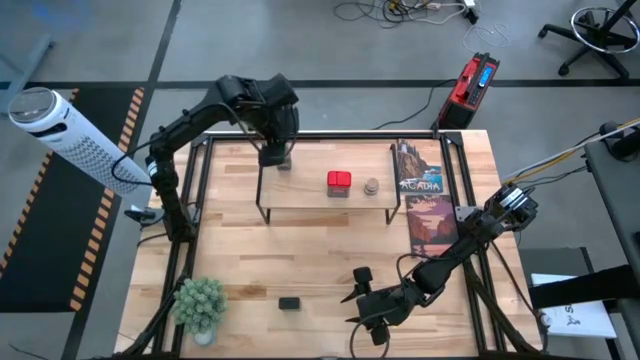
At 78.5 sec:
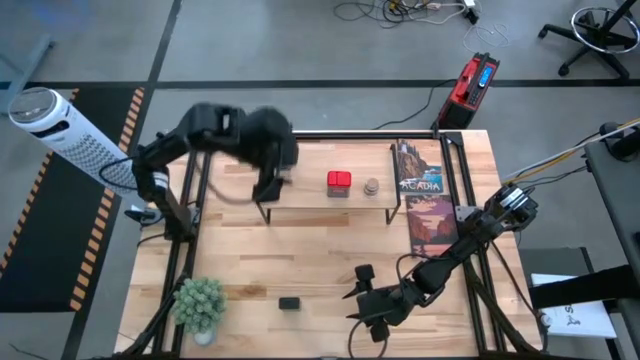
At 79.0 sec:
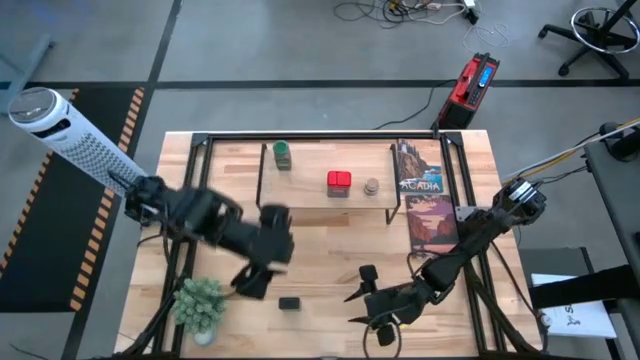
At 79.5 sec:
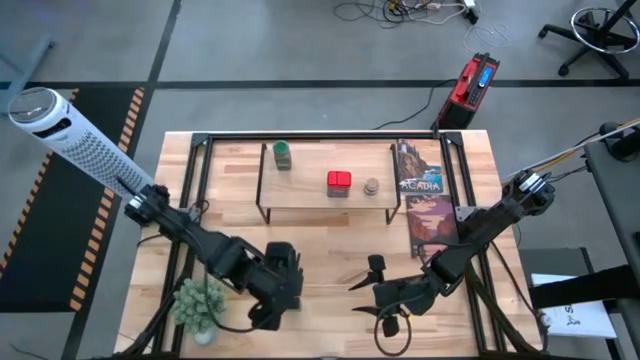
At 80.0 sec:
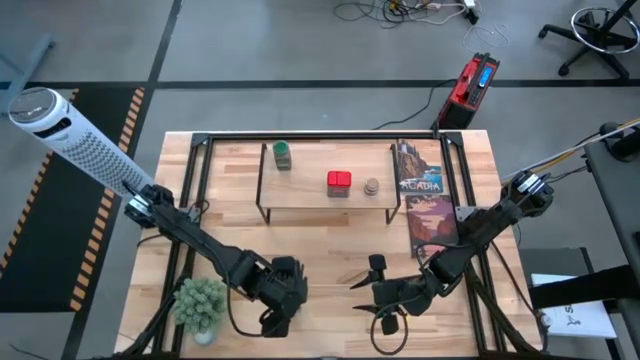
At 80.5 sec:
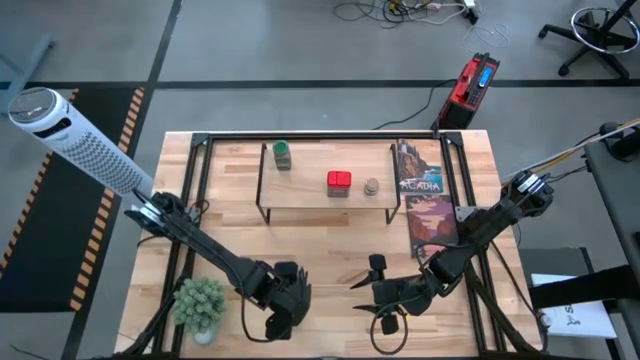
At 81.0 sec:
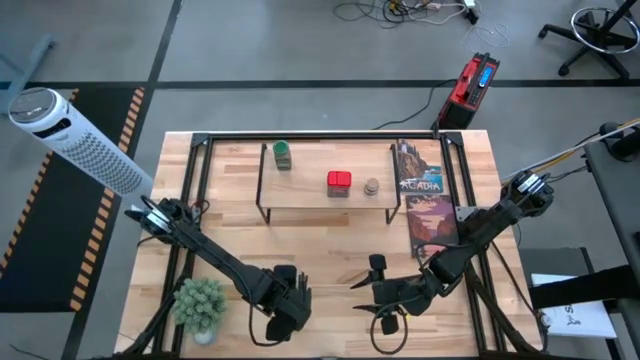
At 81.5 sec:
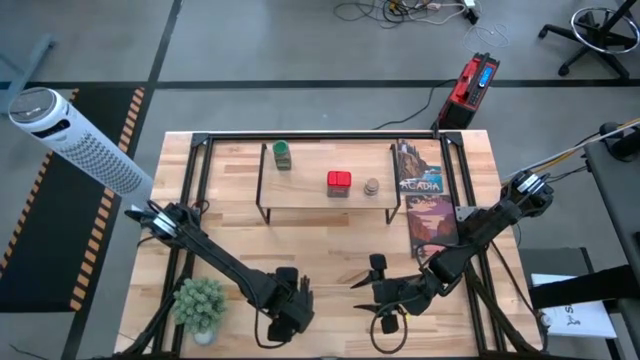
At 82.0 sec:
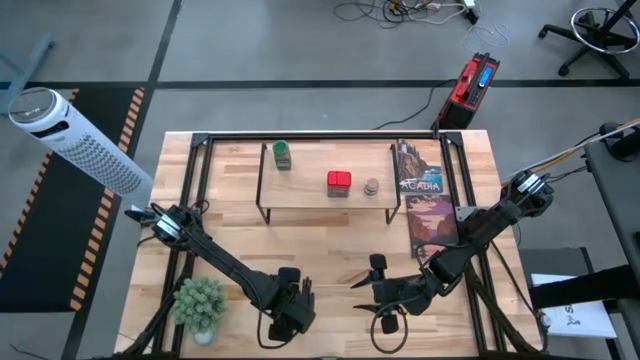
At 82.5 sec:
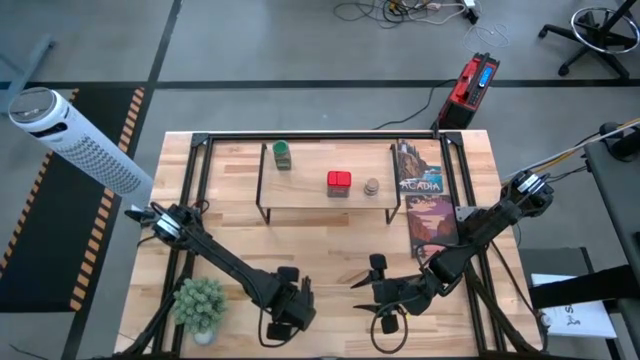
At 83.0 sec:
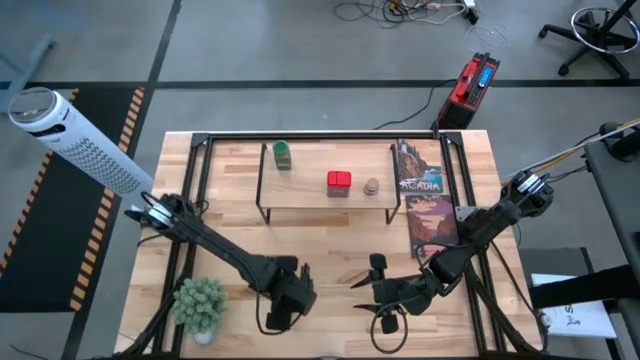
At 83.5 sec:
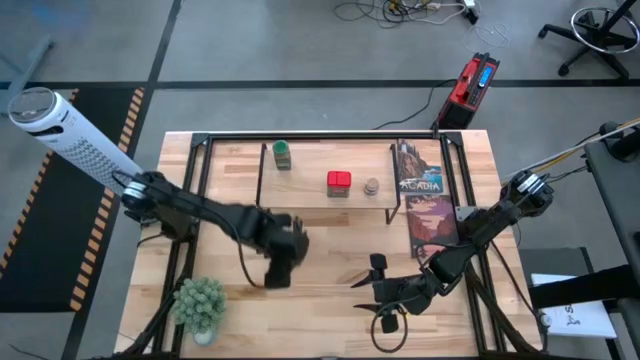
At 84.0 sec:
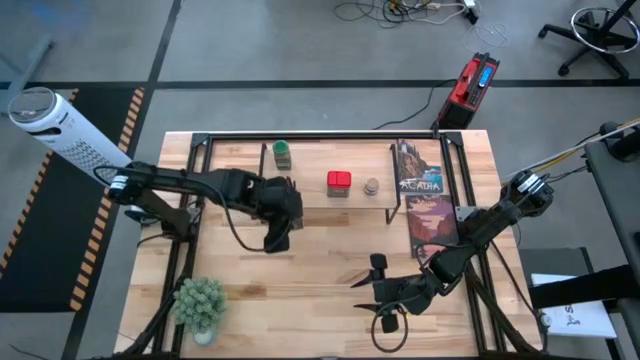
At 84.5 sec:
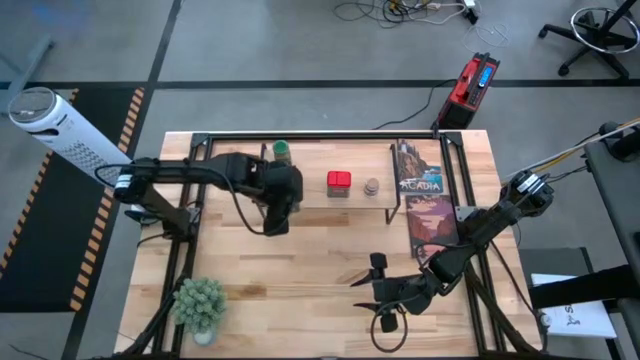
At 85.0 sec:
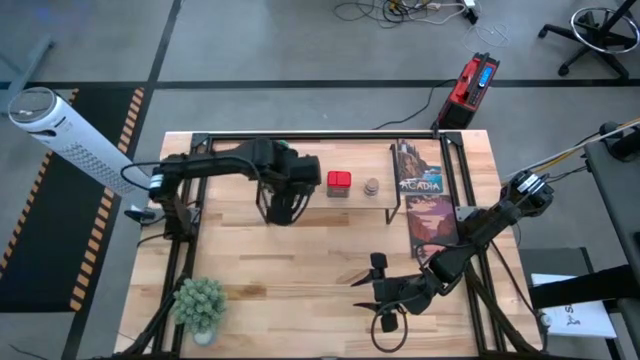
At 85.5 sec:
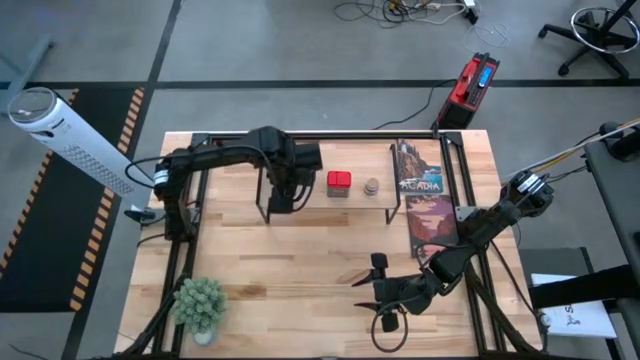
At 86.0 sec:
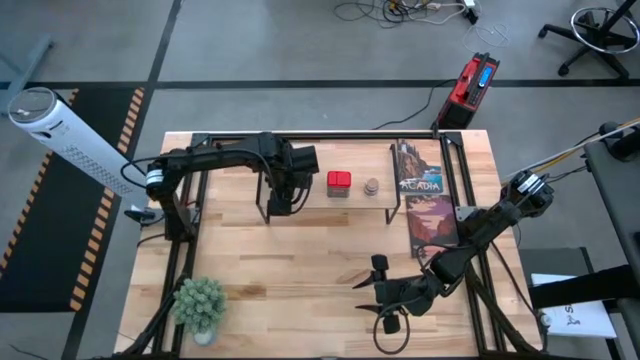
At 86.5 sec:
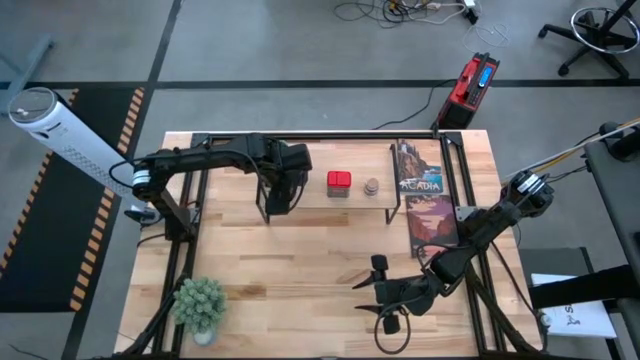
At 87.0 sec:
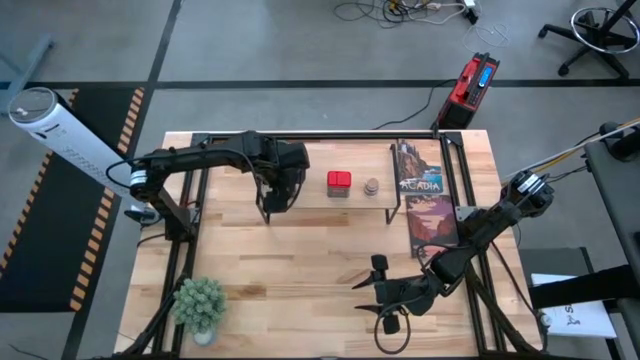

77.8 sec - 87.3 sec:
Task: Shelf spices
Put the black seasoning can on the shelf

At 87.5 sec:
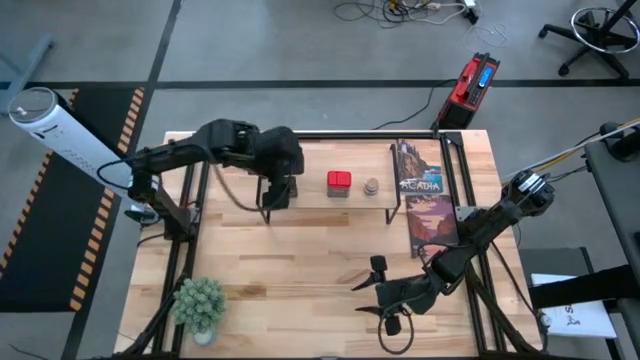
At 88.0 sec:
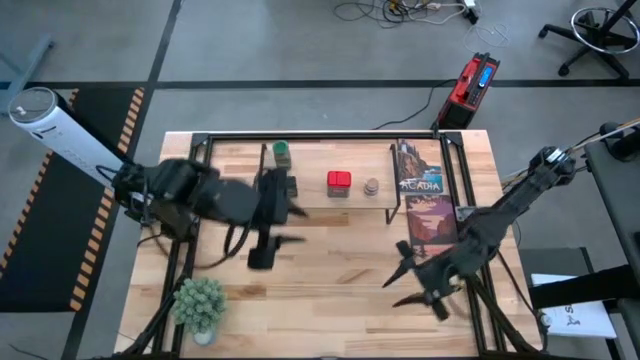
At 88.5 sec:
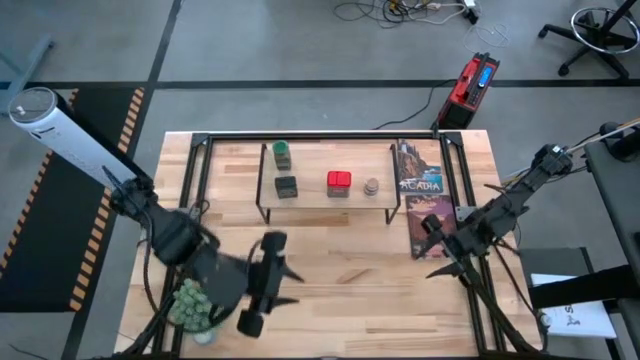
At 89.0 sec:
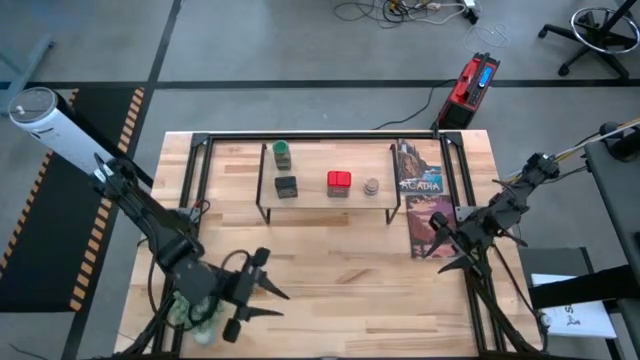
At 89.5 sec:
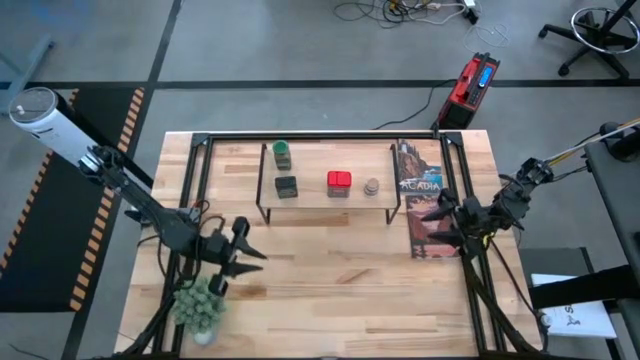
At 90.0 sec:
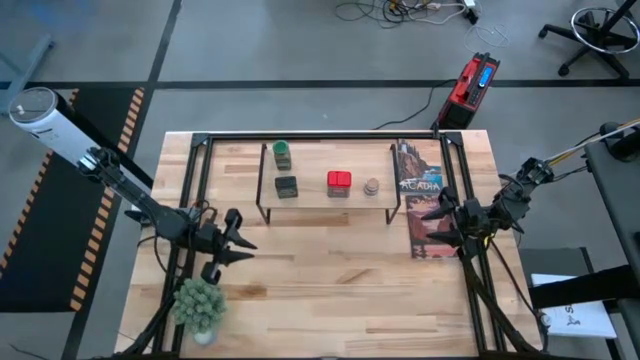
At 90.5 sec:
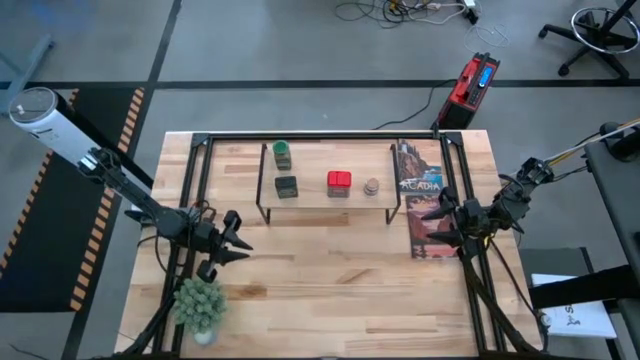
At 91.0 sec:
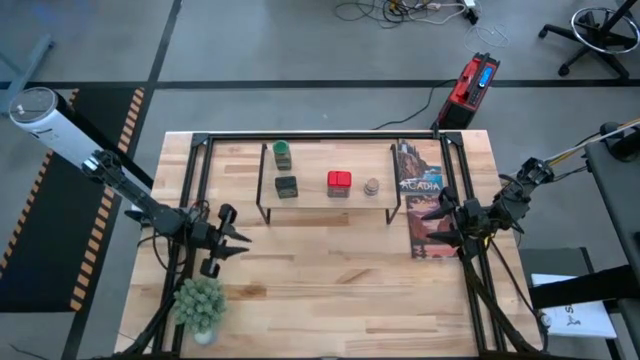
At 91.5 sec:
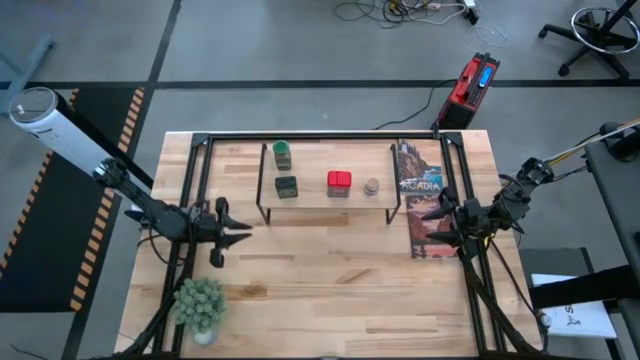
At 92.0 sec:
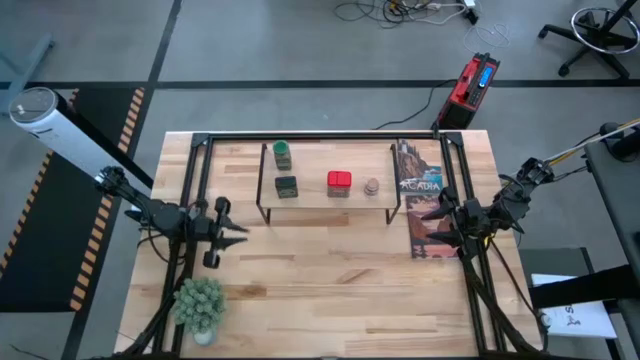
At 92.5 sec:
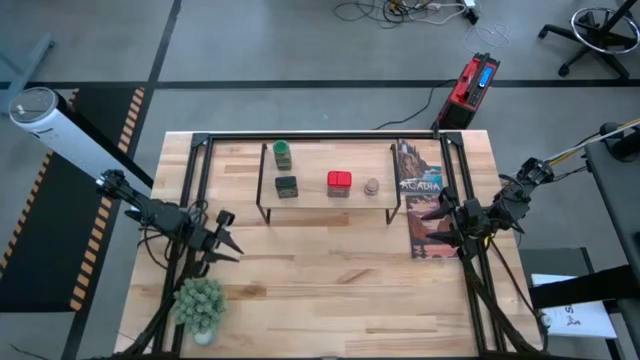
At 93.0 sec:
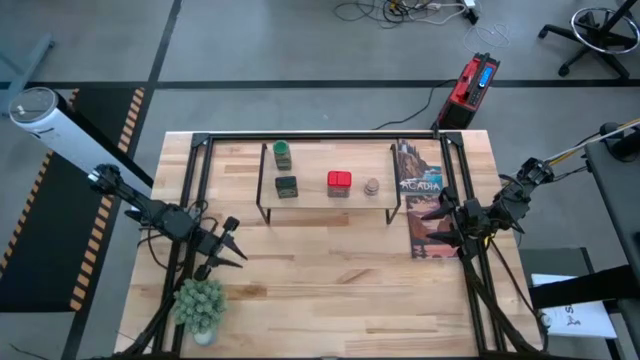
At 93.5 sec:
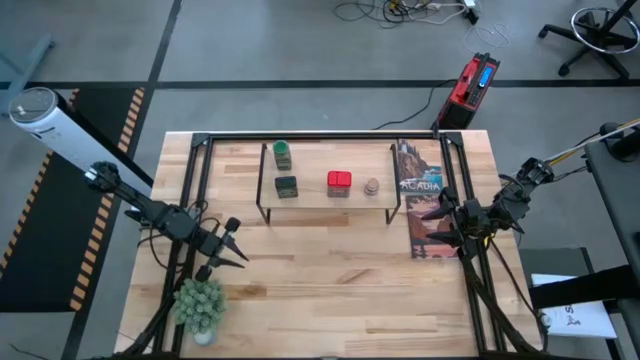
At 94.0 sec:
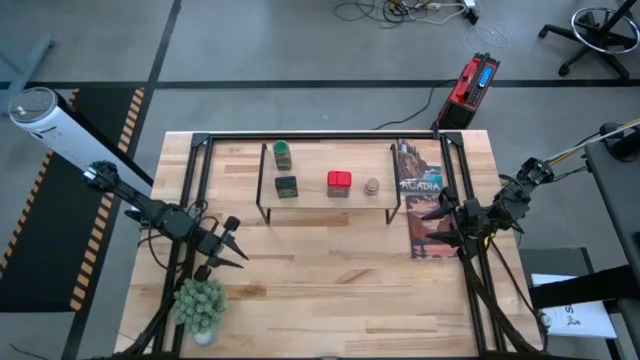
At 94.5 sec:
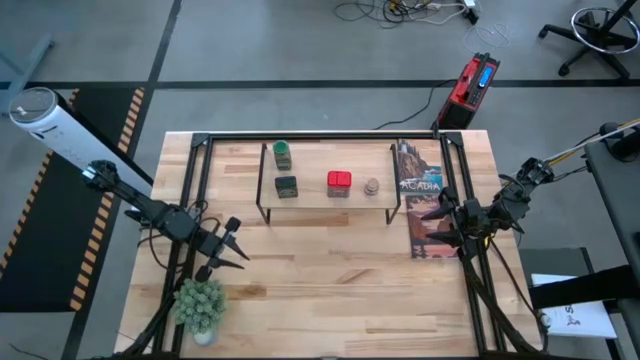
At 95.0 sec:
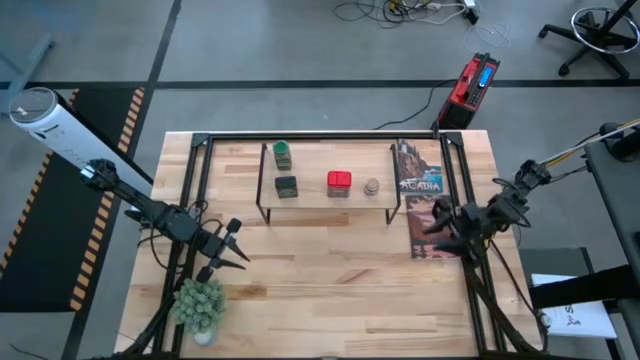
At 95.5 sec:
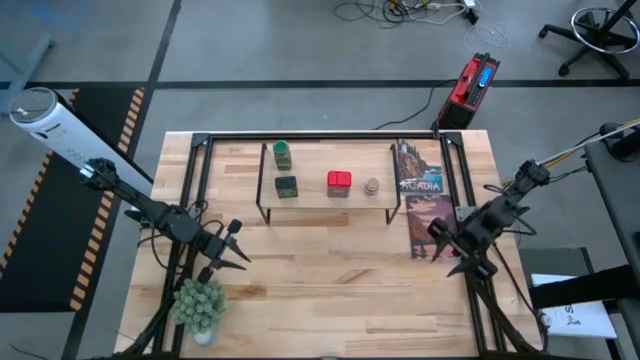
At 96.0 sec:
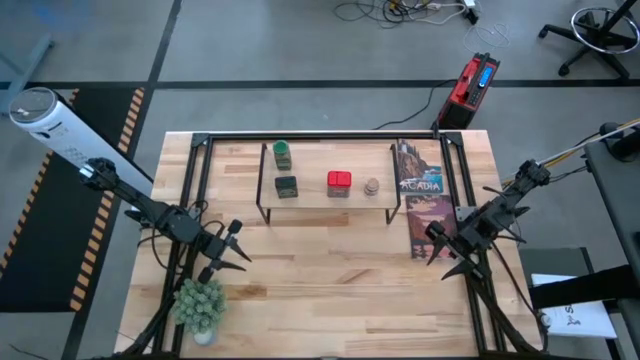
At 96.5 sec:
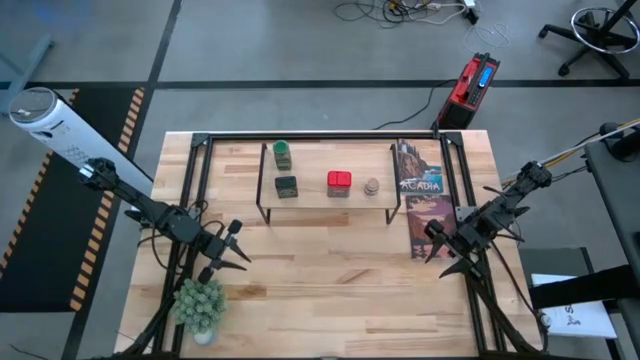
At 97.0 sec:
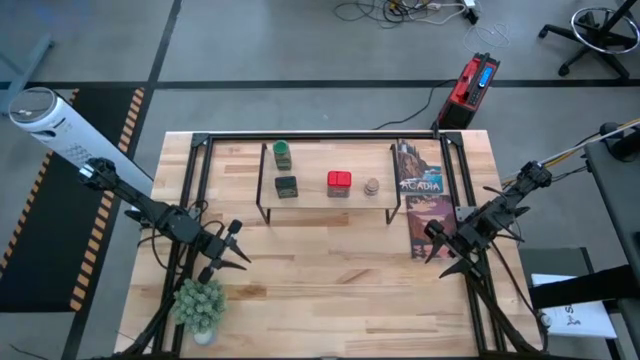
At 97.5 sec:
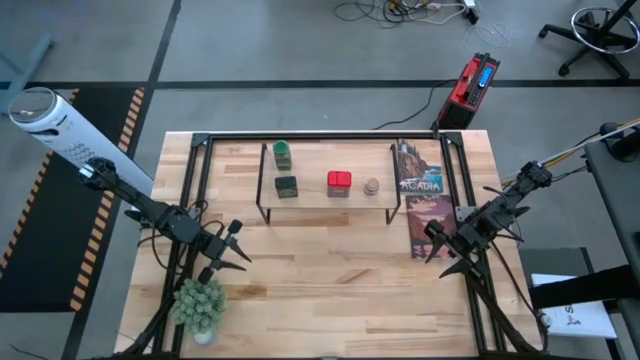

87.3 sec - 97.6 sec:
Return to Home Position

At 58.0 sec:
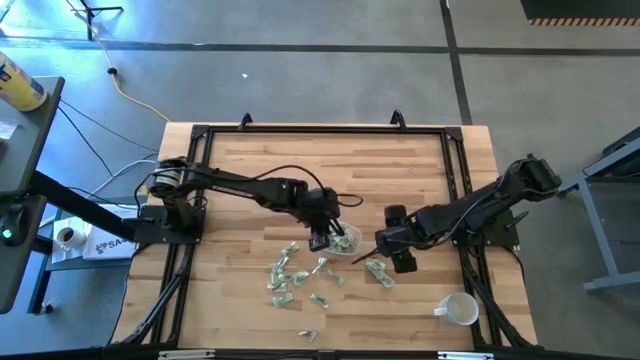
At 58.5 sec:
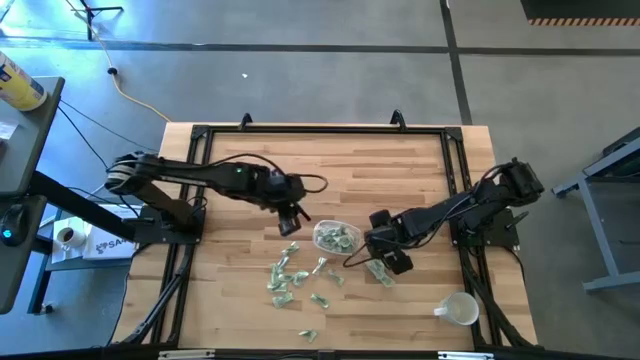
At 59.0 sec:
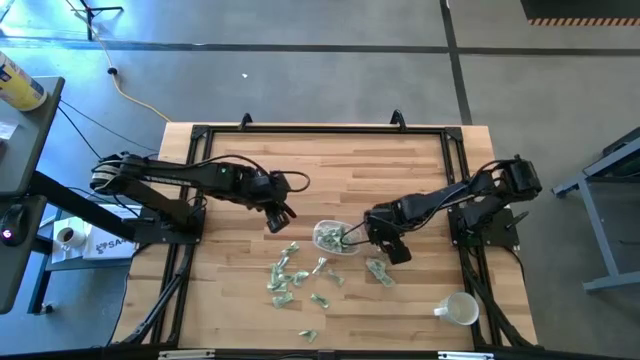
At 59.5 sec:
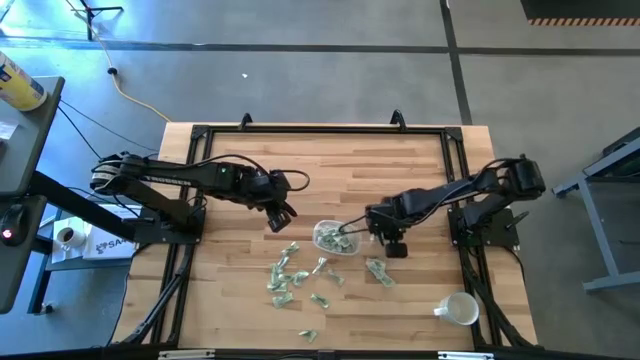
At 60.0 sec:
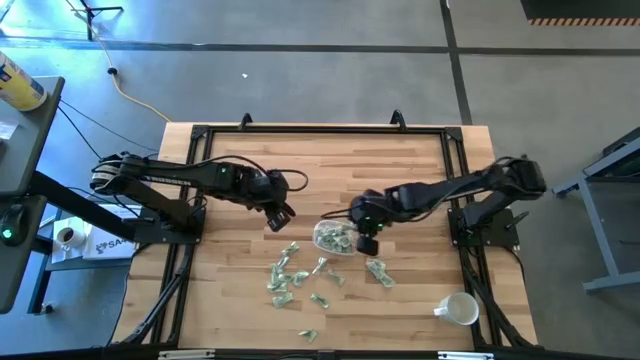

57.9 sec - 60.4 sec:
Task: Pick and place Stevia / Truvia into bins
Put the green stevia packet into the transparent container
